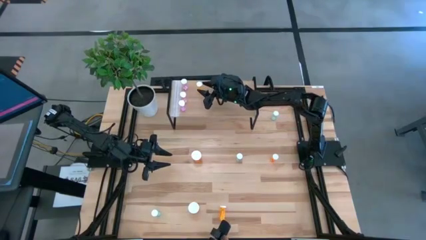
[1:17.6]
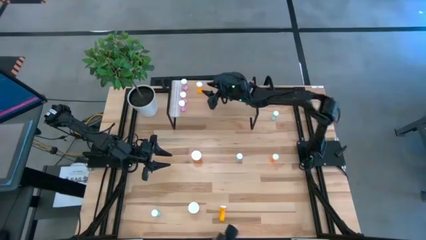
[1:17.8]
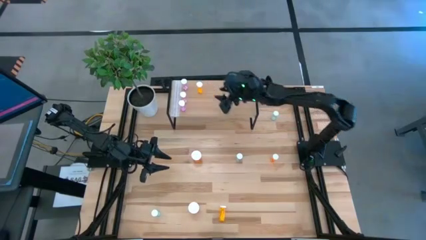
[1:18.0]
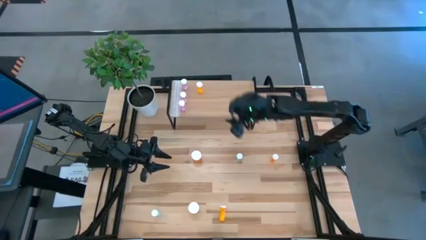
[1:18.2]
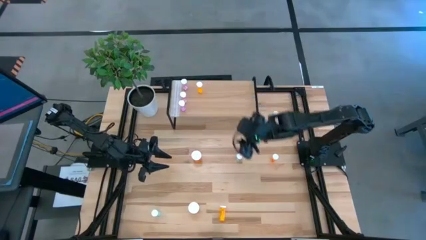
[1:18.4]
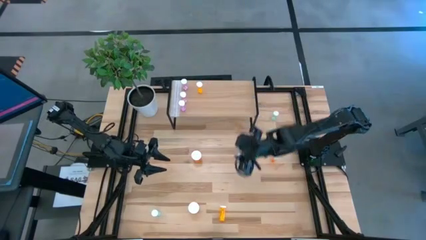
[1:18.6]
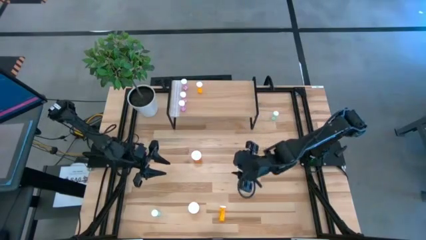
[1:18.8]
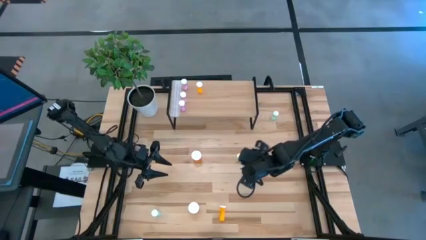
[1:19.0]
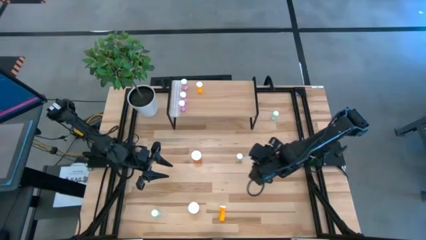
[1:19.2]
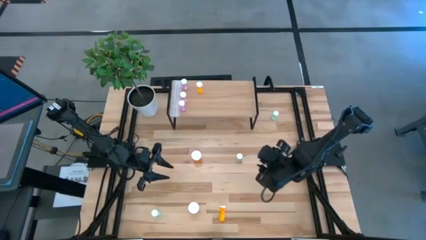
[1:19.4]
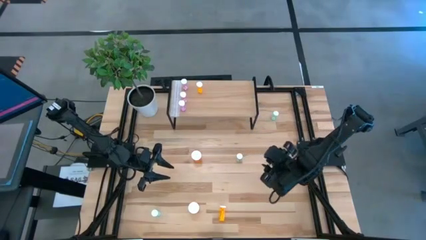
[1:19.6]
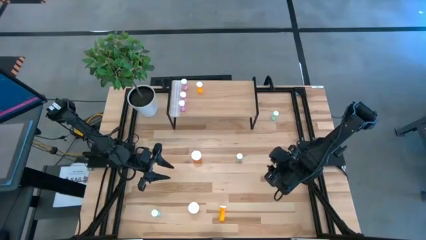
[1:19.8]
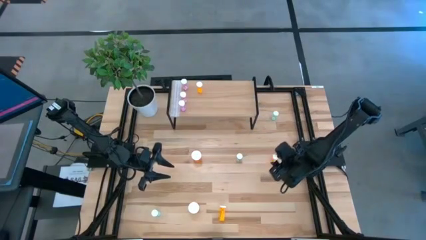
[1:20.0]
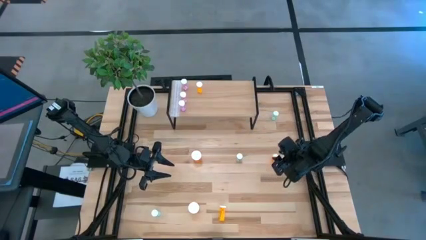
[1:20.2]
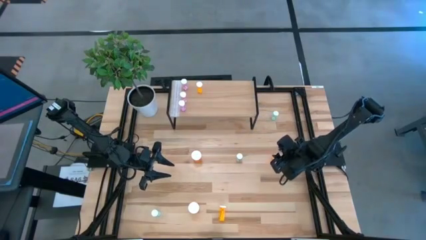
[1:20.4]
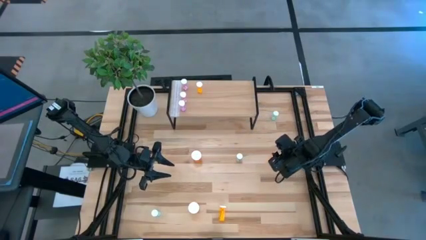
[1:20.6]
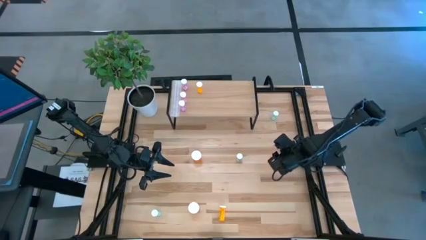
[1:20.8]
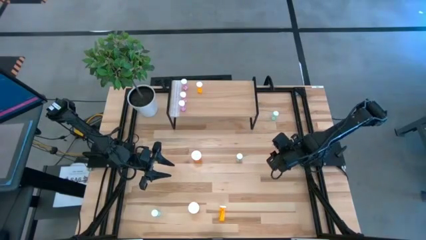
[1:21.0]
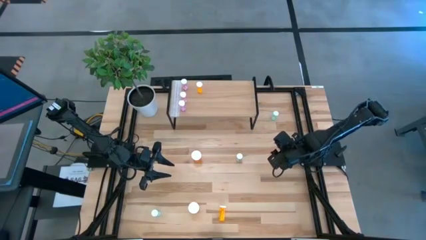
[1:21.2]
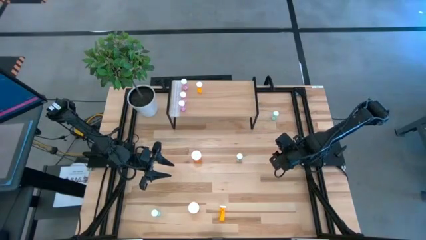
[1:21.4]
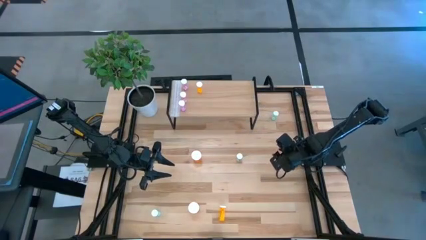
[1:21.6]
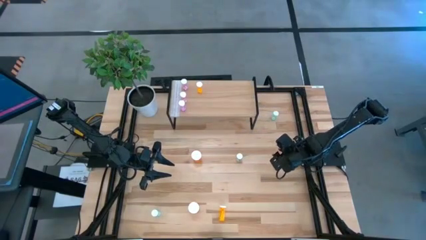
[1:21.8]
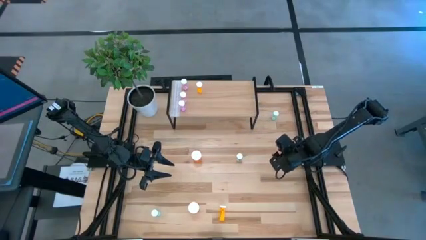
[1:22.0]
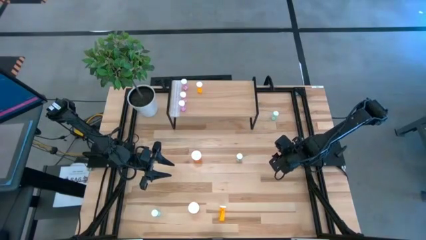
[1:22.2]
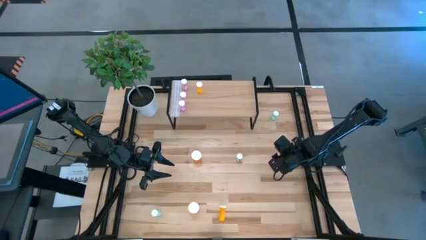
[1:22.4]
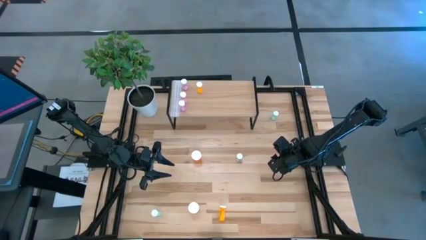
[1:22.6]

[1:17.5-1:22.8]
Task: Pick and place medicine bottles onto shelf by color
Put the top small orange pill bottle on the shelf aligned with the other small orange pill bottle

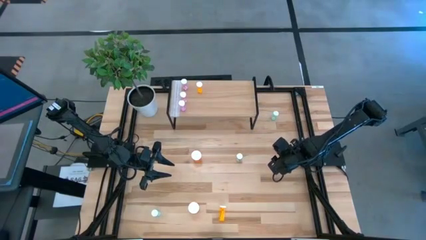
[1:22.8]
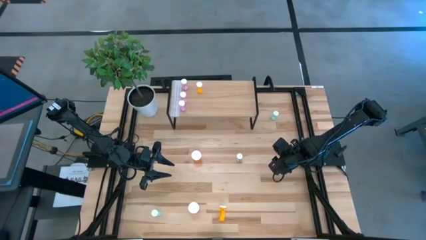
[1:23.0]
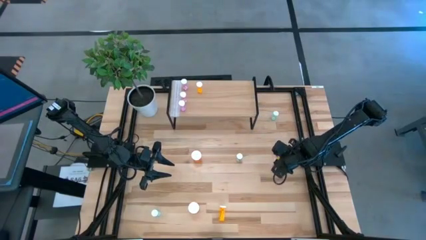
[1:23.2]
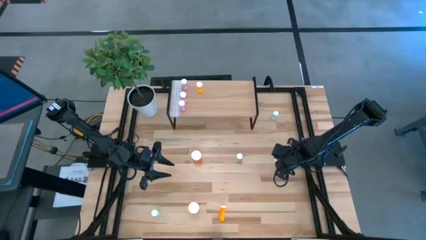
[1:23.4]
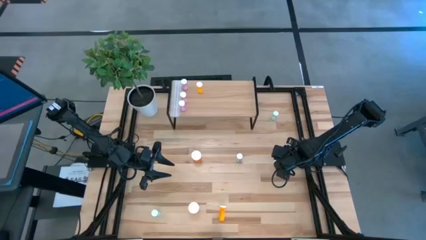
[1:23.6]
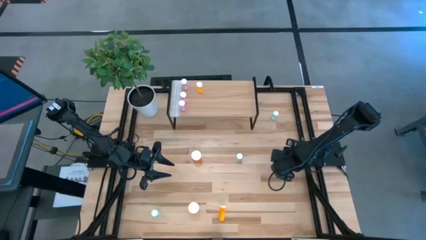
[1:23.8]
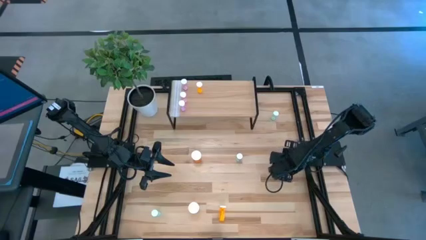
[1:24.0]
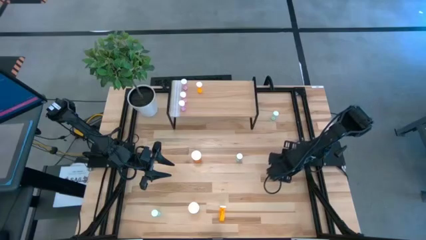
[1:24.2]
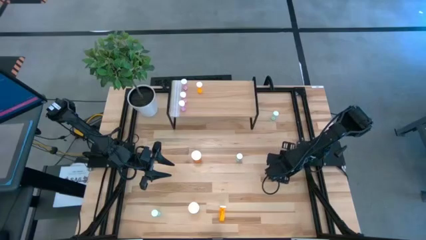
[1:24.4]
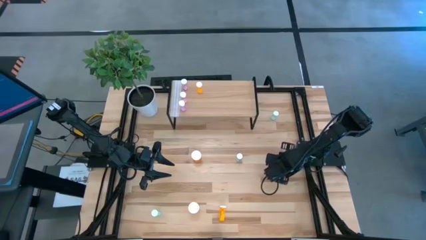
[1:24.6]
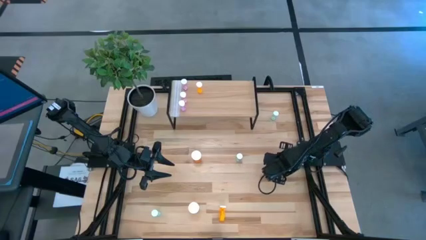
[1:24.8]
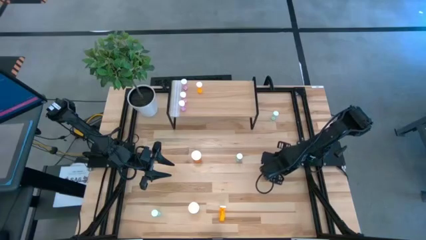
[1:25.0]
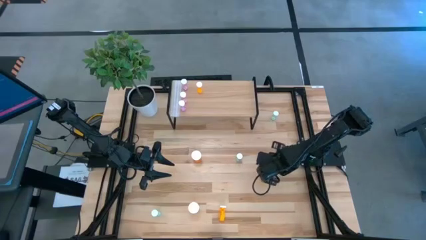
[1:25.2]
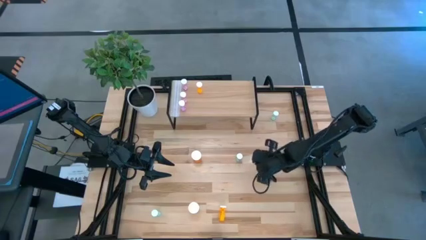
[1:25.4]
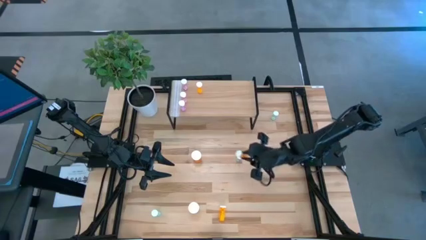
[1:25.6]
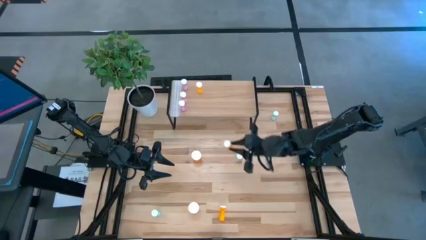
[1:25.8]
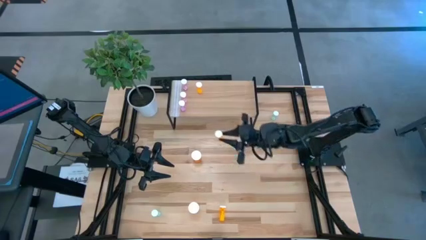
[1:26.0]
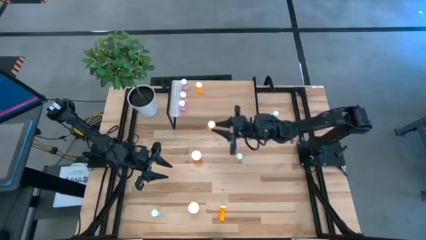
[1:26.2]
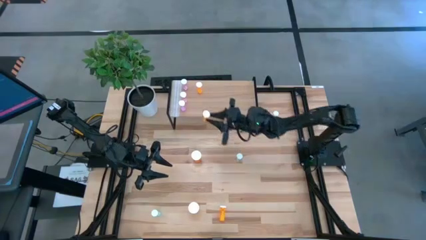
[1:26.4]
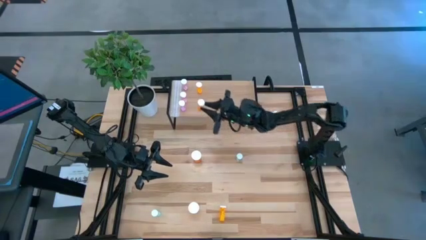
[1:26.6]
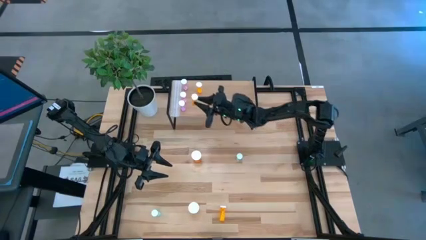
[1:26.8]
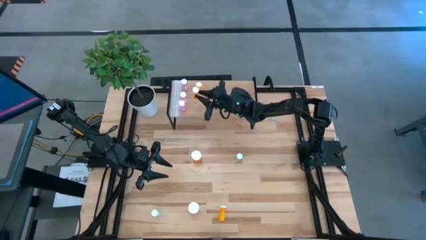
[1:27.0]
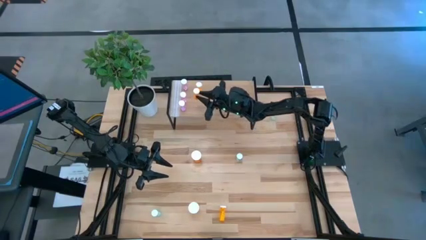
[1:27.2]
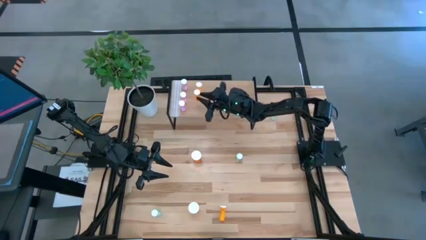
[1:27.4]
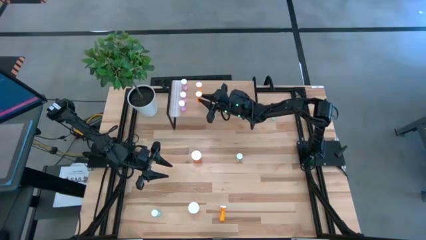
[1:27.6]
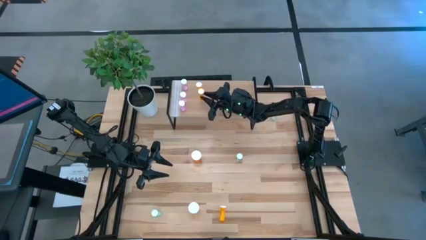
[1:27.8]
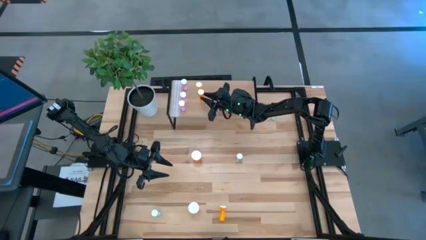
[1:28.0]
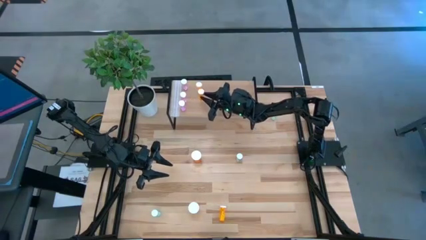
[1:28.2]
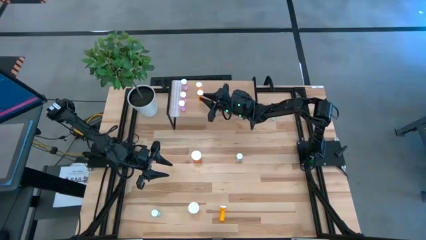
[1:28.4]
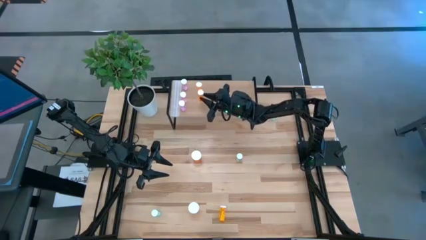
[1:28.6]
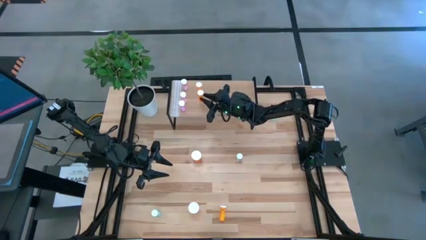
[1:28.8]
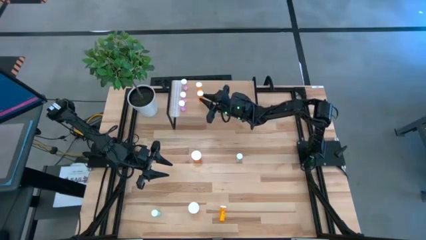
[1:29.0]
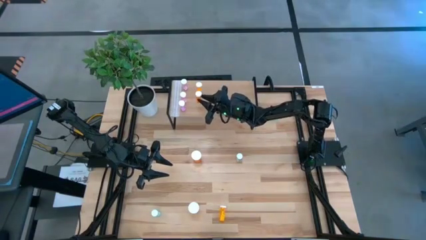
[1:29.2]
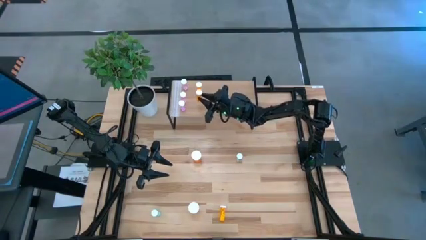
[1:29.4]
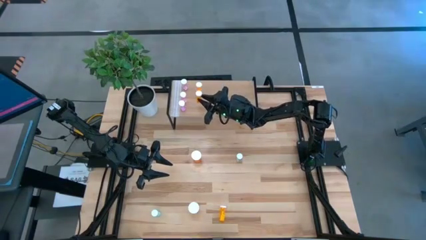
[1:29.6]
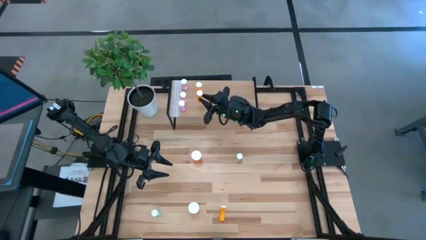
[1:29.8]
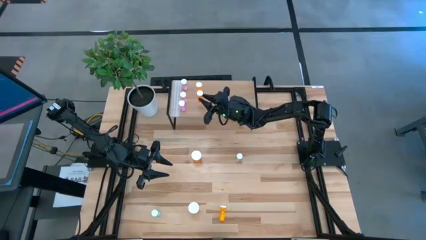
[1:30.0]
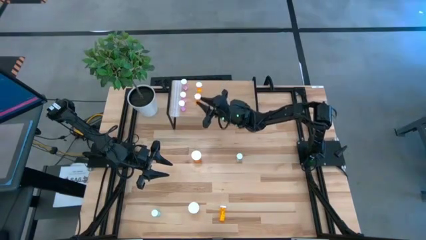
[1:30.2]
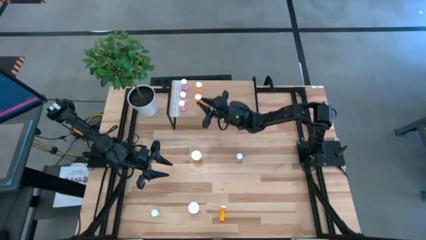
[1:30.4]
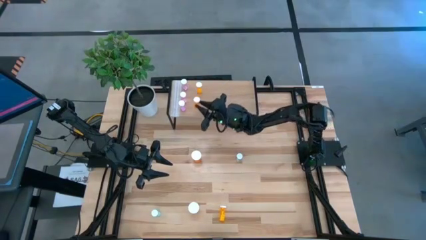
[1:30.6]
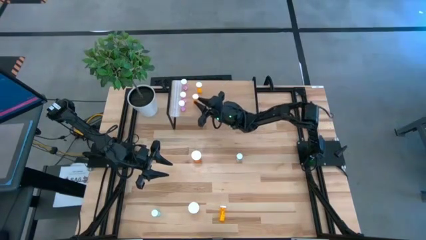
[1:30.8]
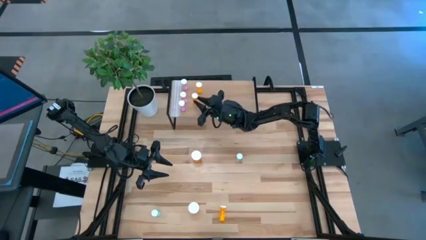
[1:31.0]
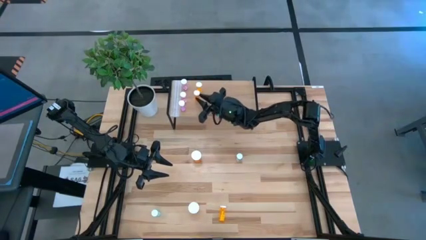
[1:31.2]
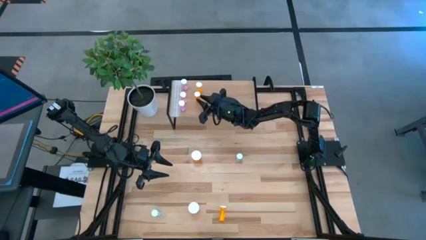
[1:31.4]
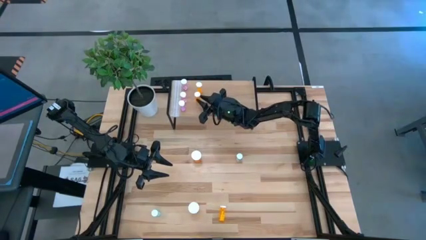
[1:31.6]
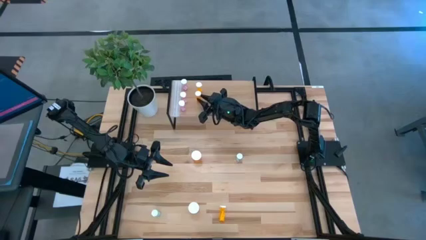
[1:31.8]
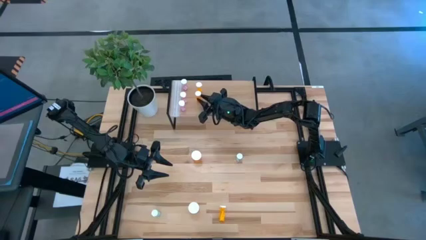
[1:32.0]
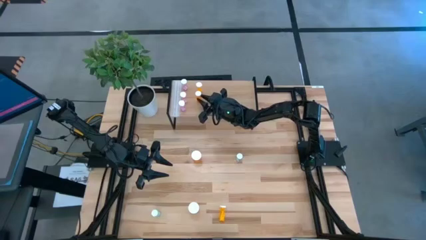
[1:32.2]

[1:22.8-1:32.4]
Put the top small orange pill bottle on the shelf aligned with the other small orange pill bottle

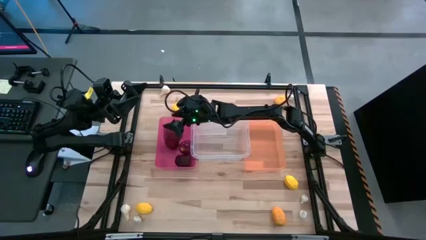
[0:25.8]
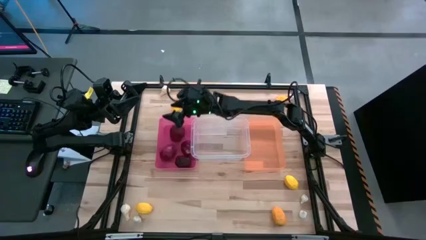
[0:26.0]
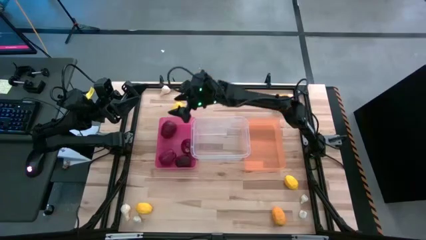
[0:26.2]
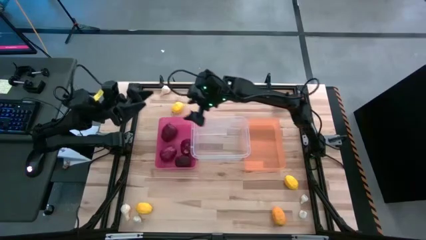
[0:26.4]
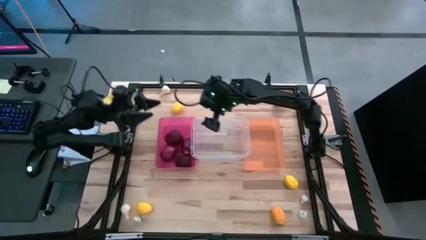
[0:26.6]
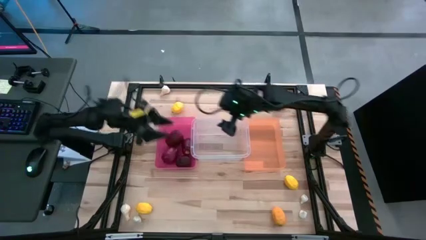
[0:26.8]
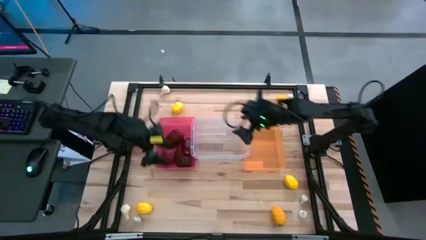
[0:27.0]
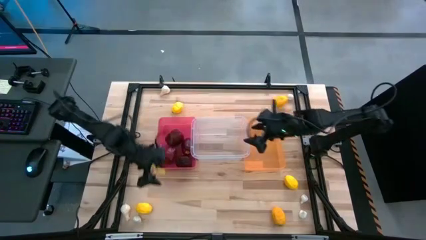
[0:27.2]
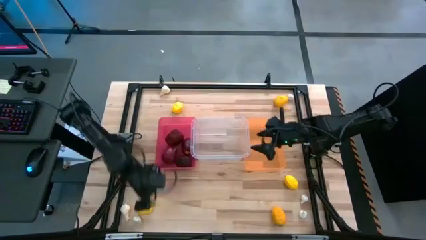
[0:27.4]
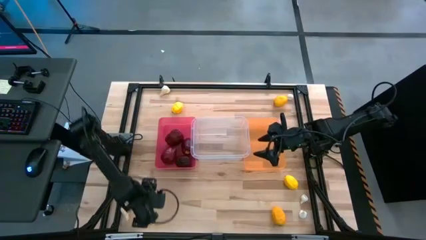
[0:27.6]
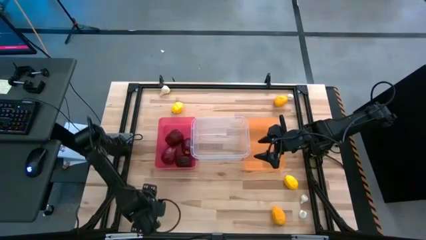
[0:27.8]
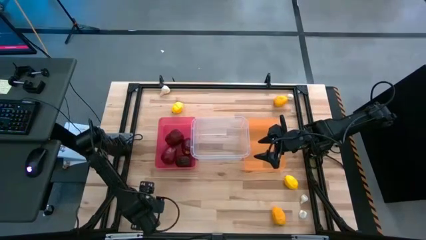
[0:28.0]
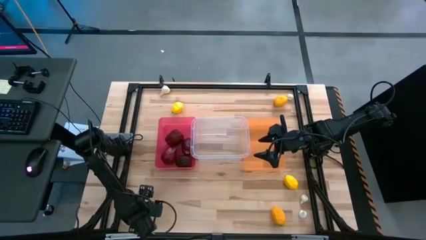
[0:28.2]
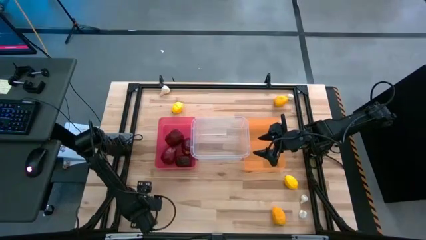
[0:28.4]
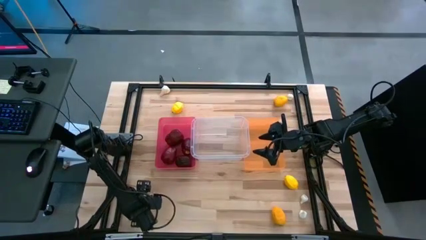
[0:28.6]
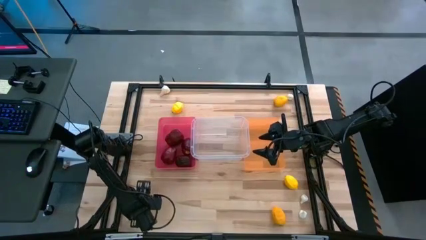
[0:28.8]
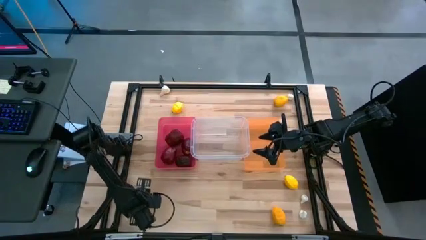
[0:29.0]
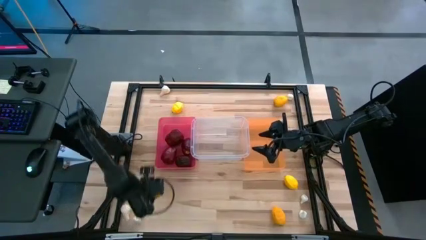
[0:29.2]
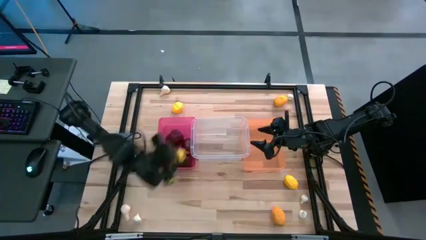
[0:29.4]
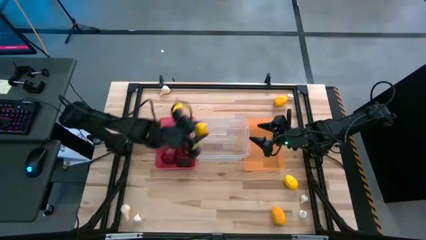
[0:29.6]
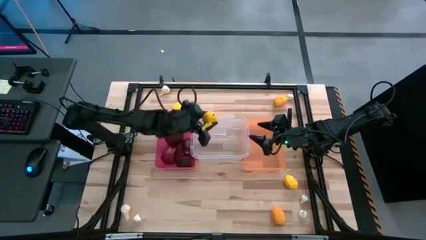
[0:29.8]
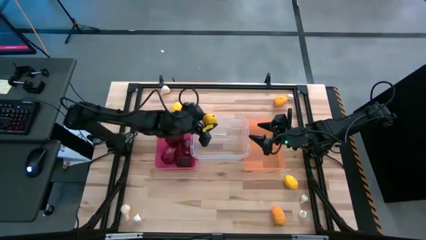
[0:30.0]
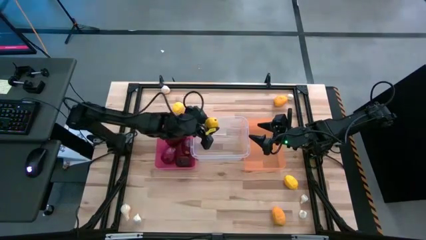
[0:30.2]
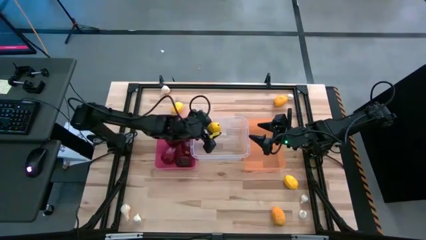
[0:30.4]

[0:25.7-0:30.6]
Task: Sort produce into baskets
Put the yellow lemon into the transparent bin
